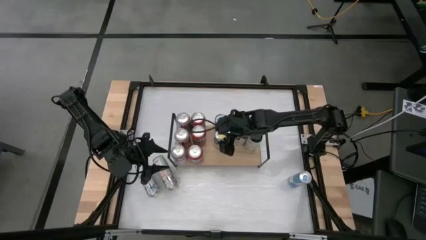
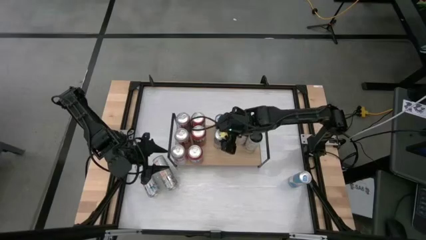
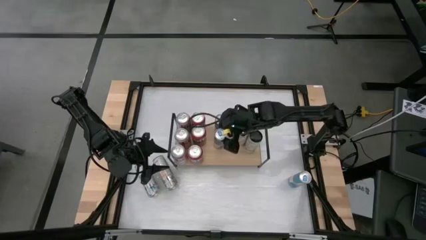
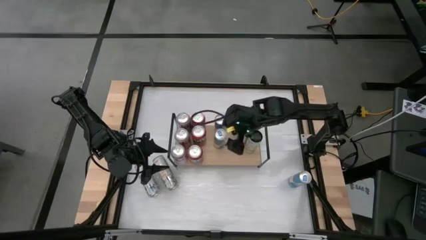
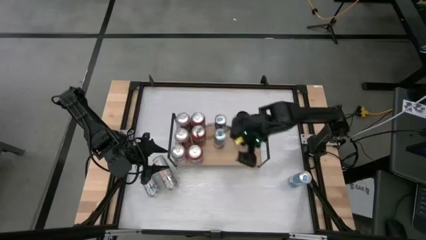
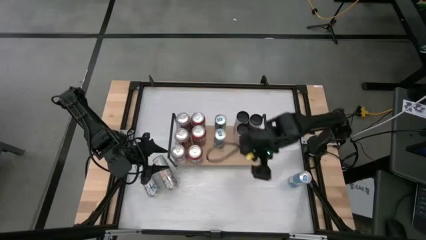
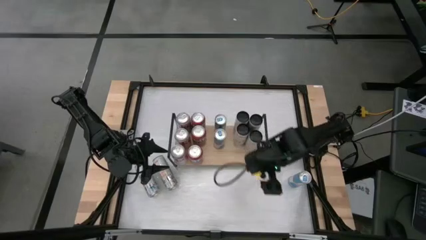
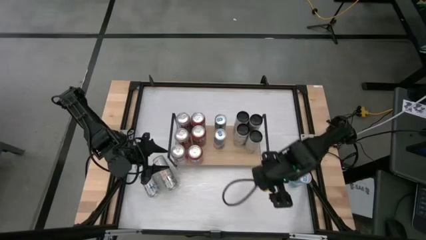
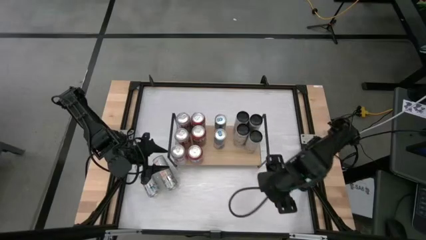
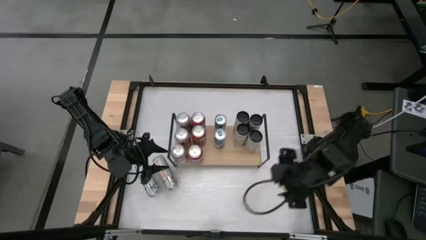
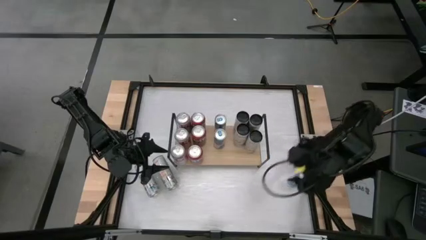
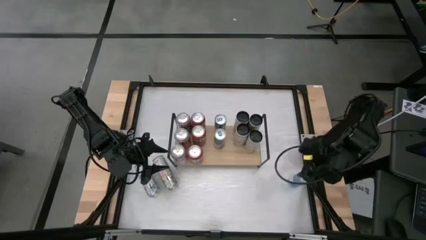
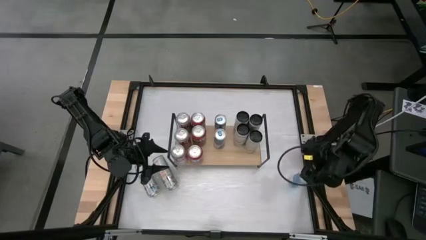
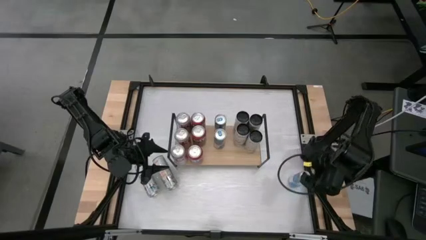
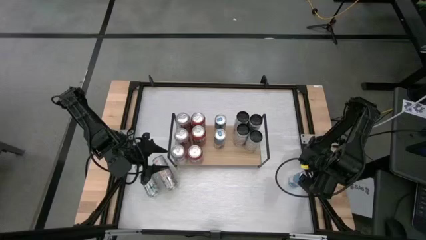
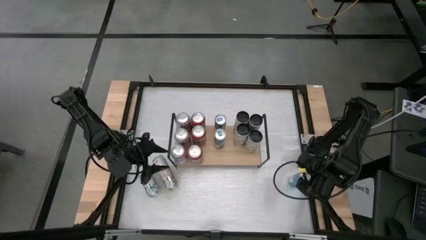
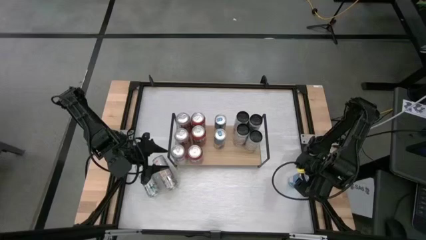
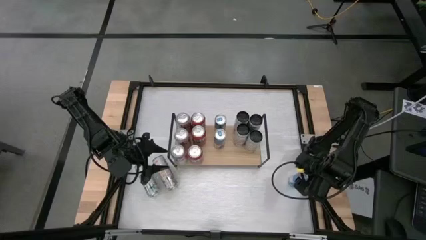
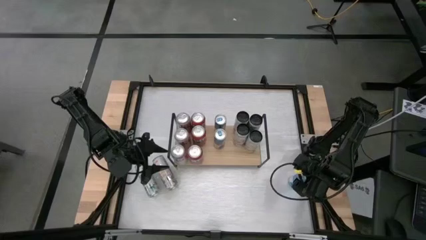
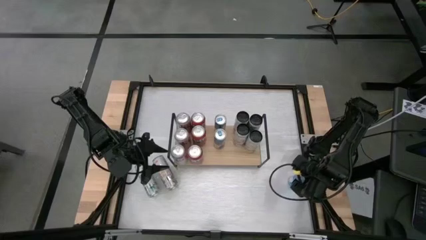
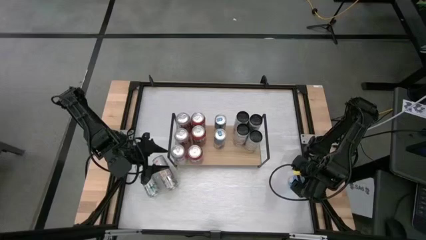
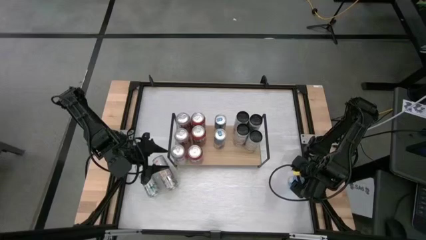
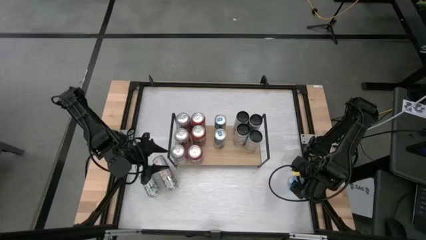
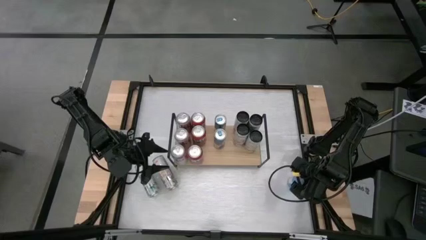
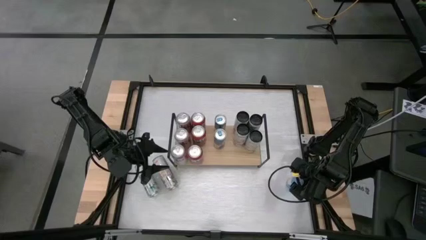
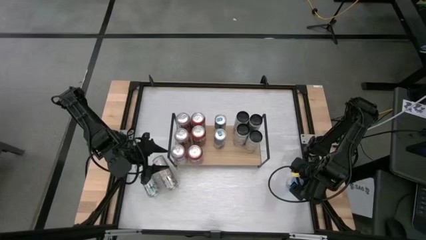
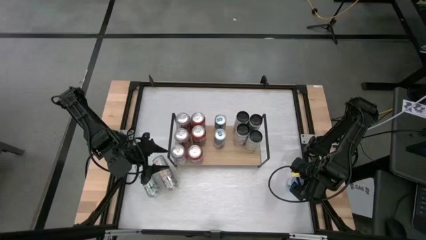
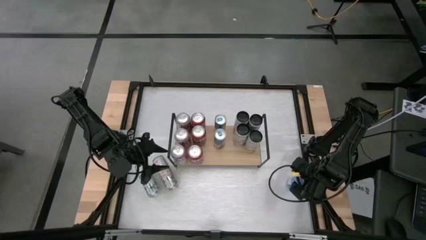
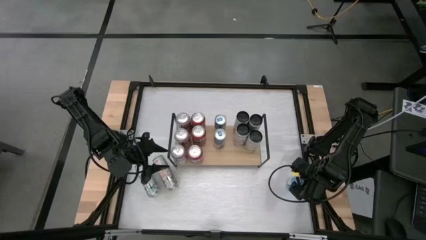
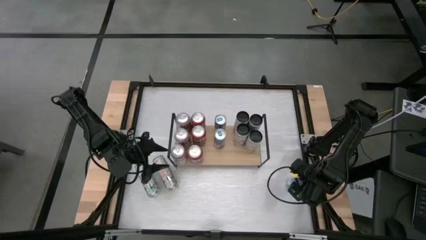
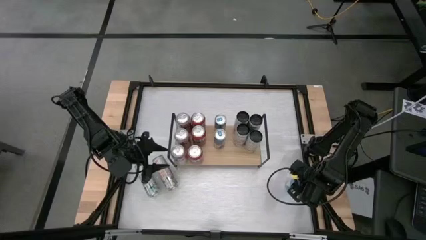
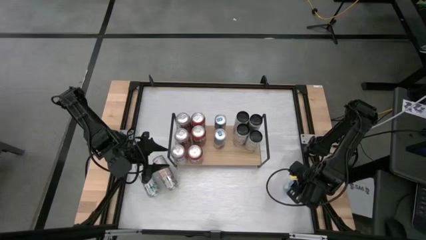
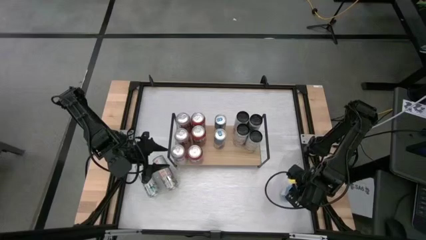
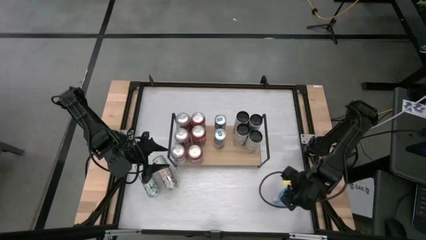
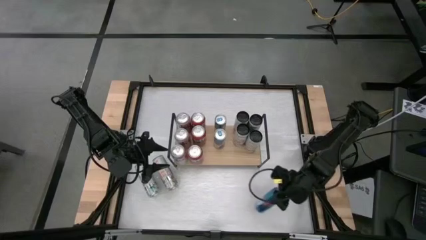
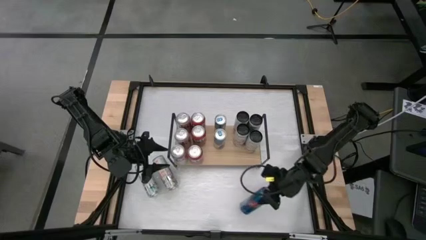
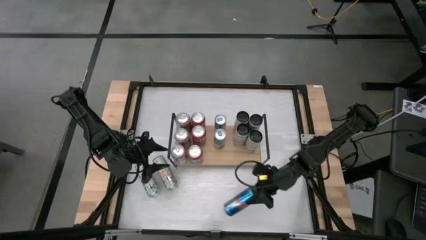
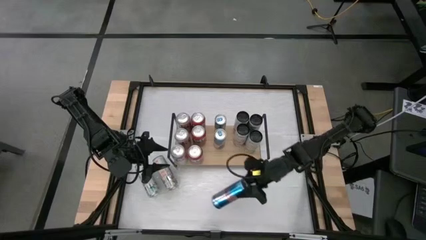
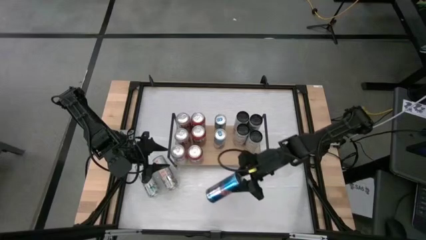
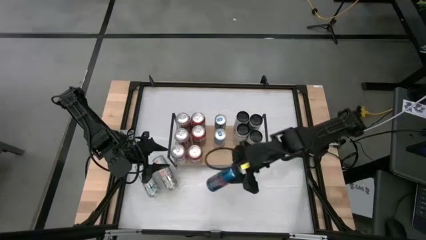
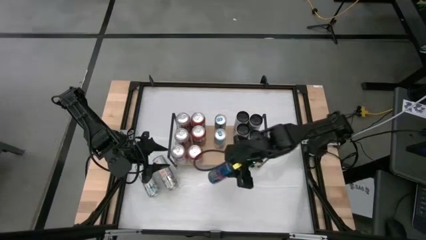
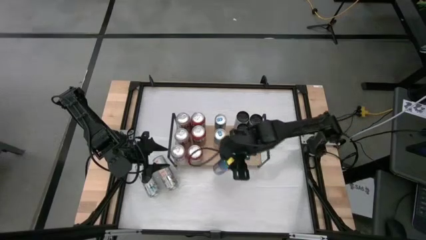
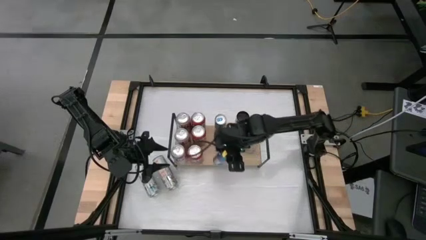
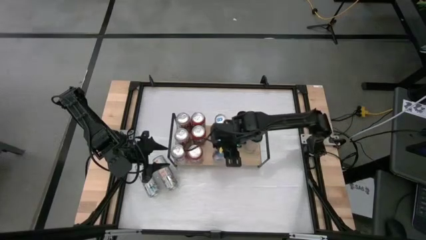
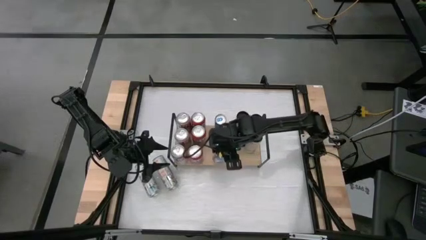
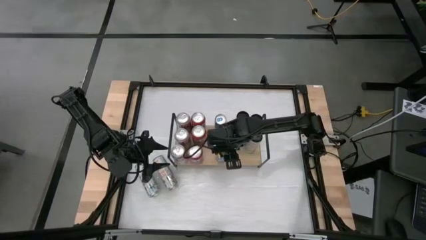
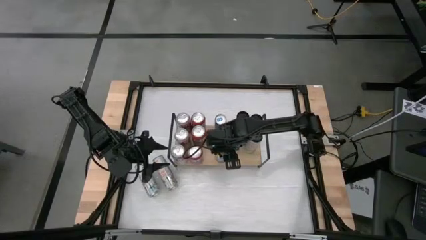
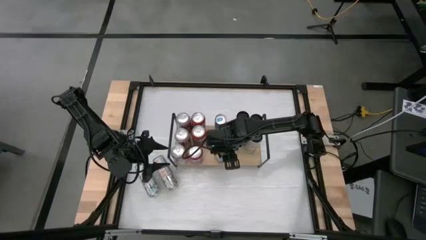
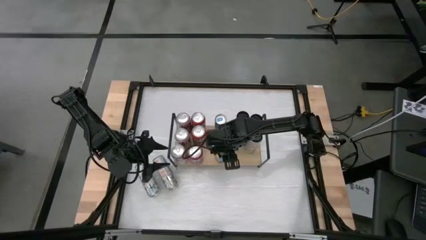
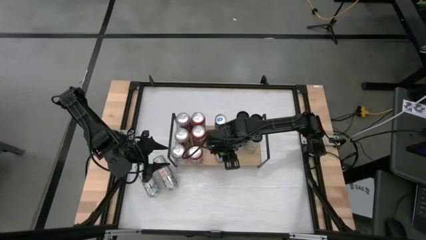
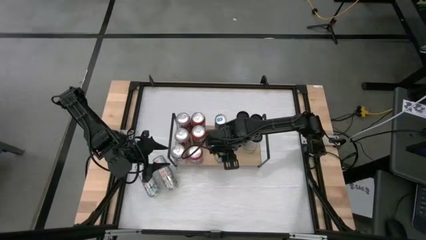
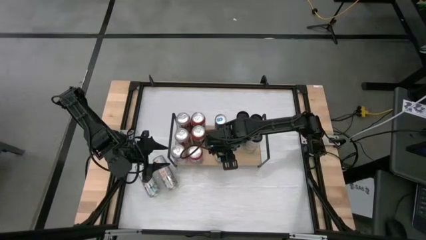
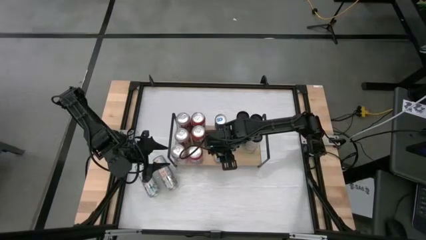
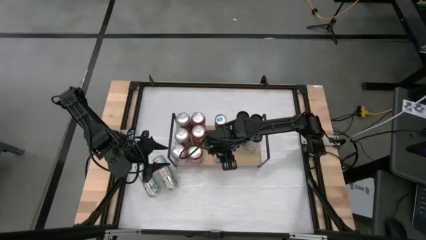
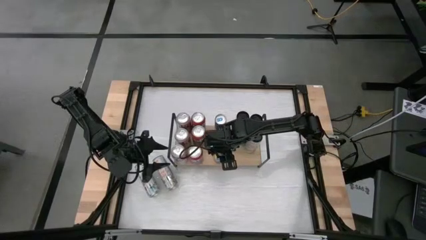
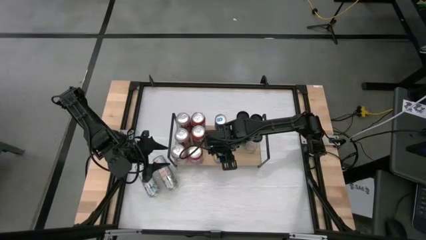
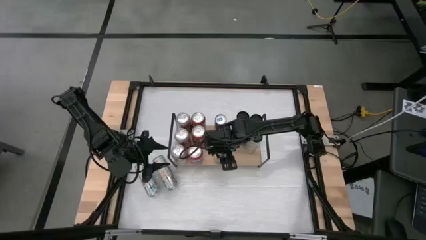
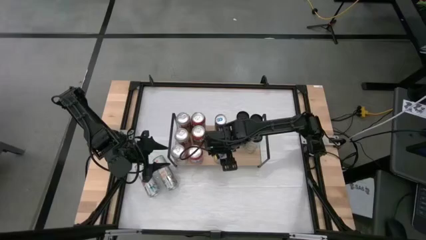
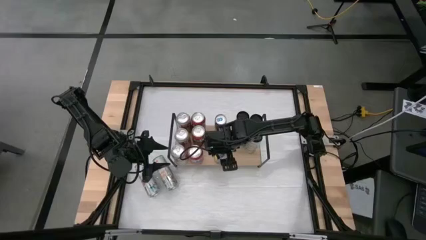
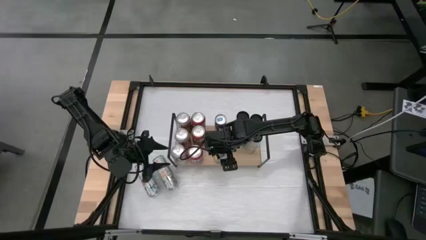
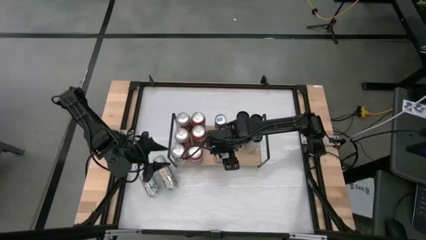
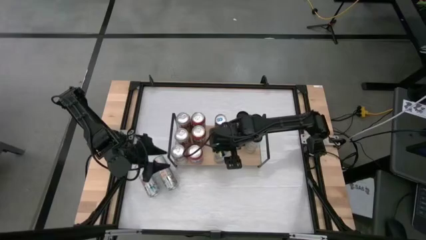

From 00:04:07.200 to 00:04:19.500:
Task: Place canned beverage on shelf
Put the blue soda can on the shelf aligned with the other blue soda can
